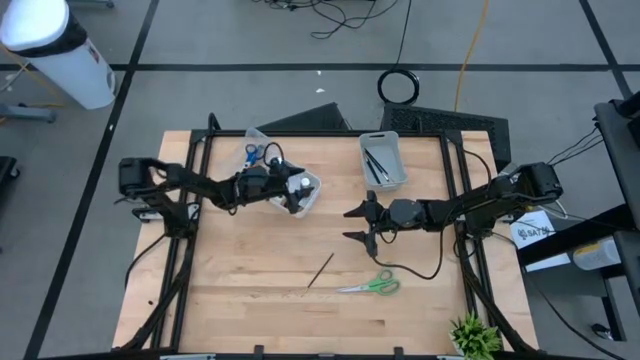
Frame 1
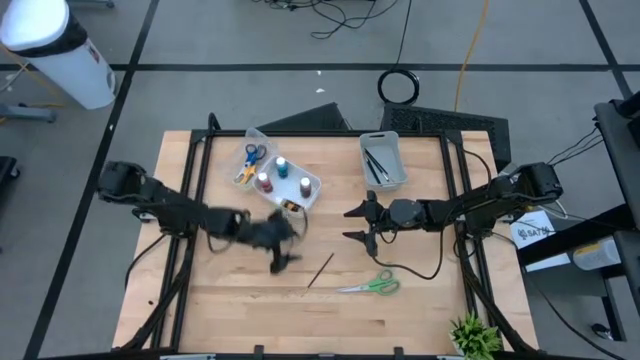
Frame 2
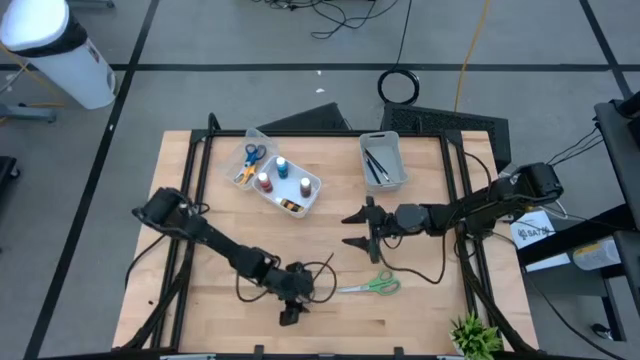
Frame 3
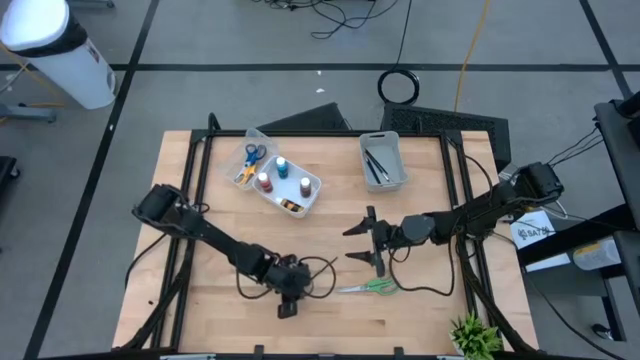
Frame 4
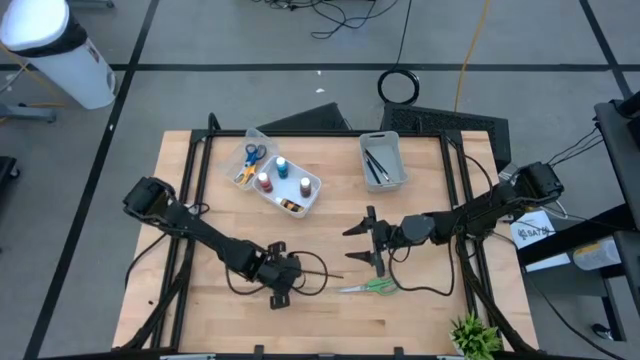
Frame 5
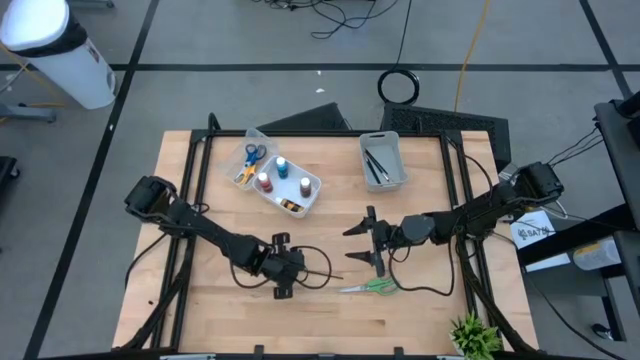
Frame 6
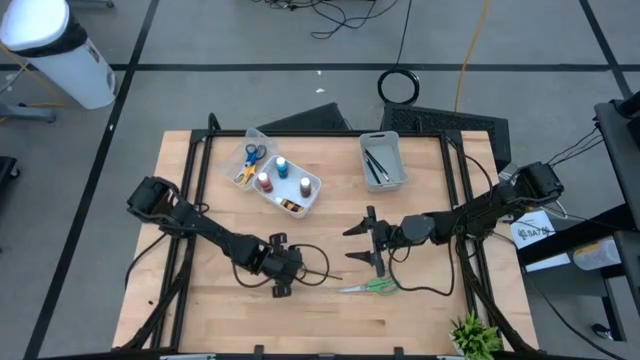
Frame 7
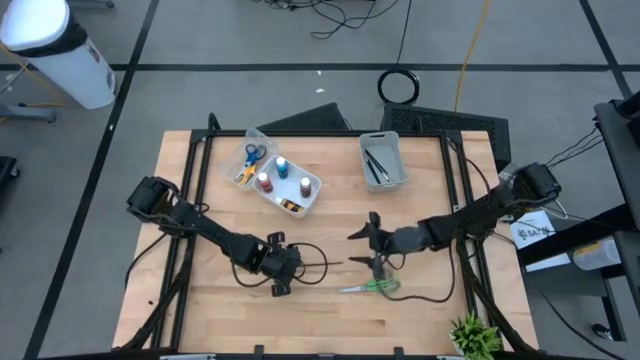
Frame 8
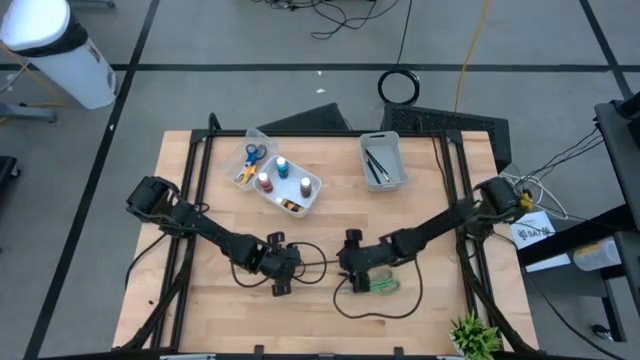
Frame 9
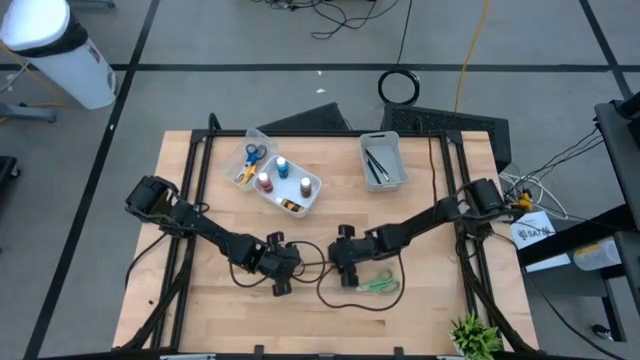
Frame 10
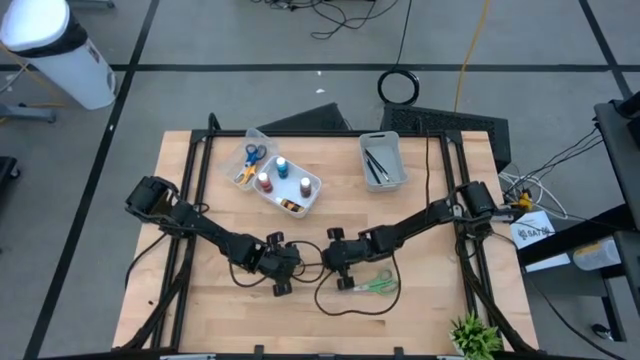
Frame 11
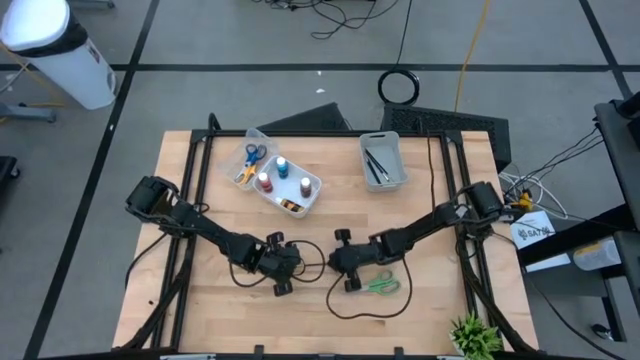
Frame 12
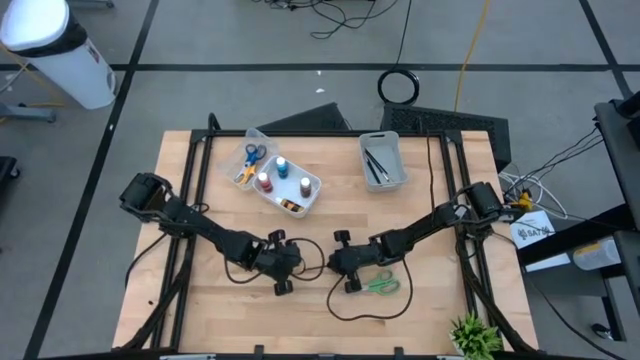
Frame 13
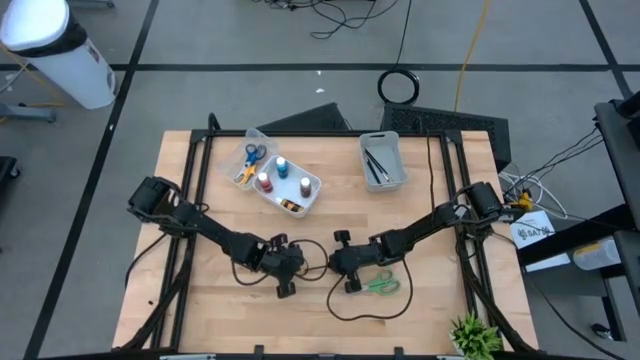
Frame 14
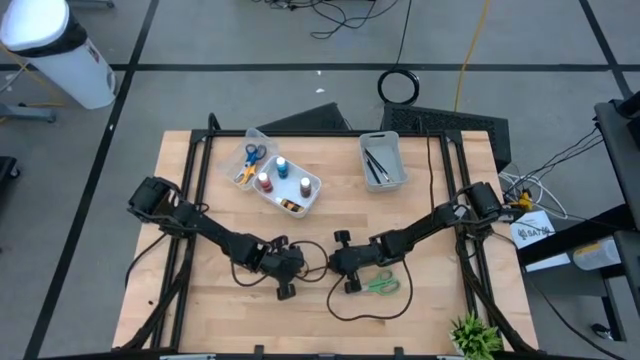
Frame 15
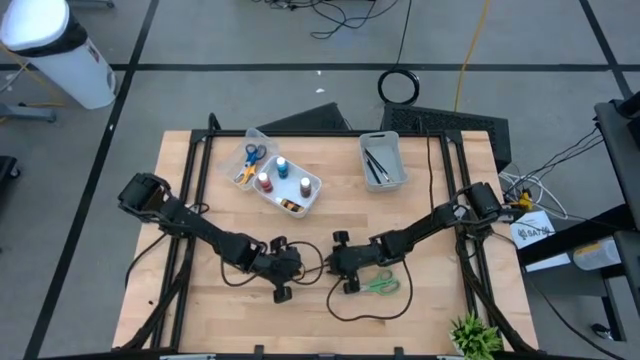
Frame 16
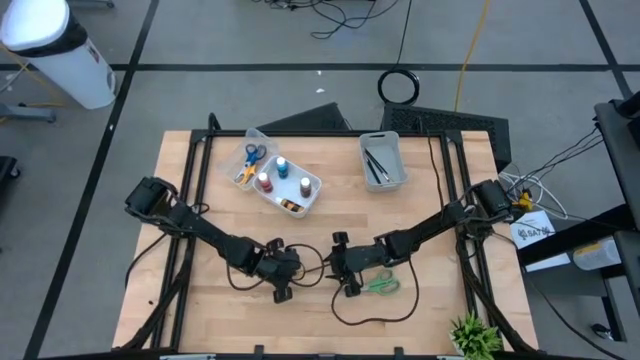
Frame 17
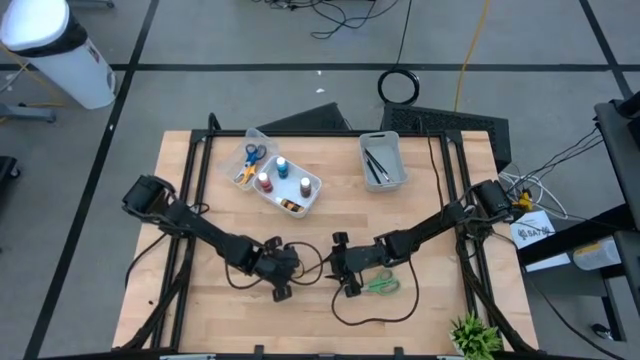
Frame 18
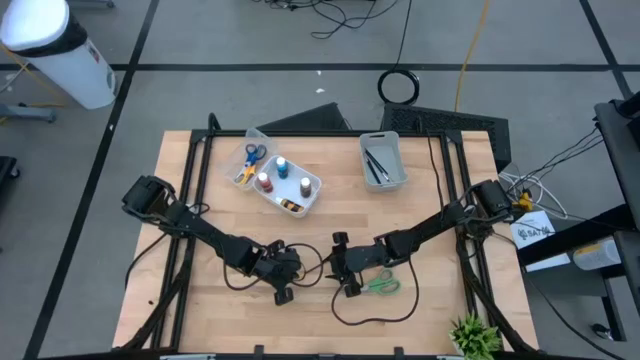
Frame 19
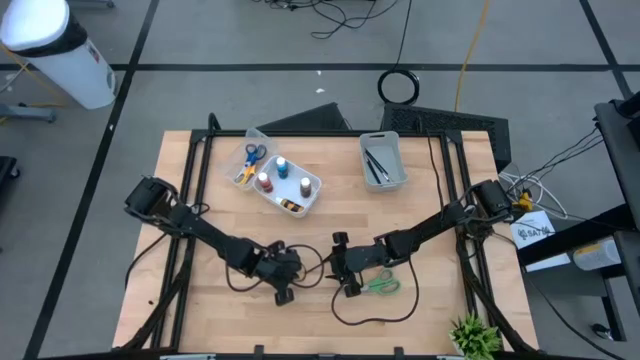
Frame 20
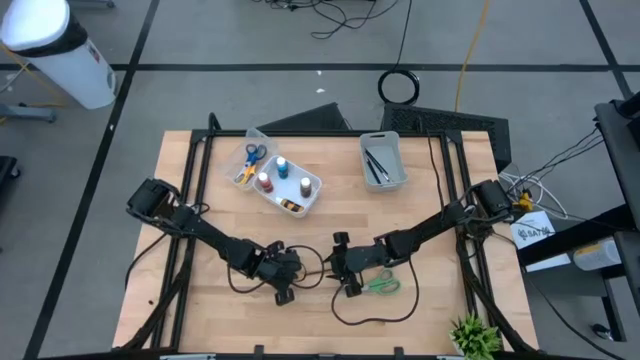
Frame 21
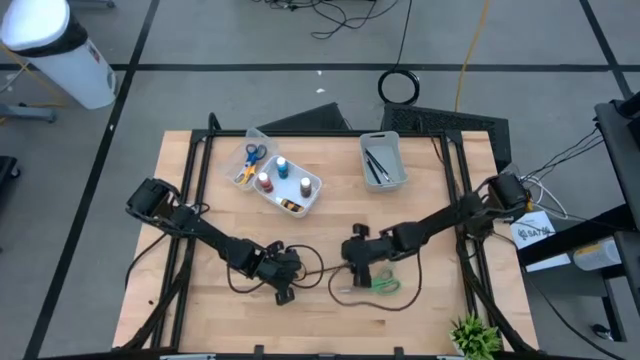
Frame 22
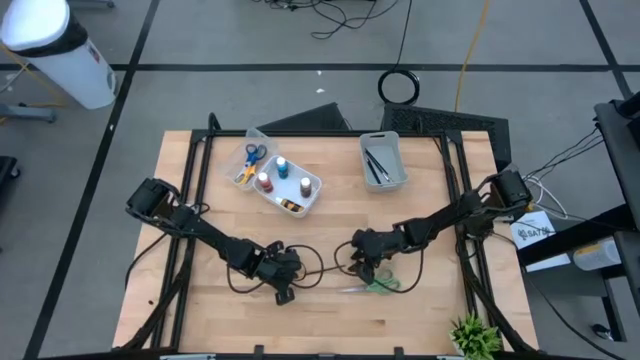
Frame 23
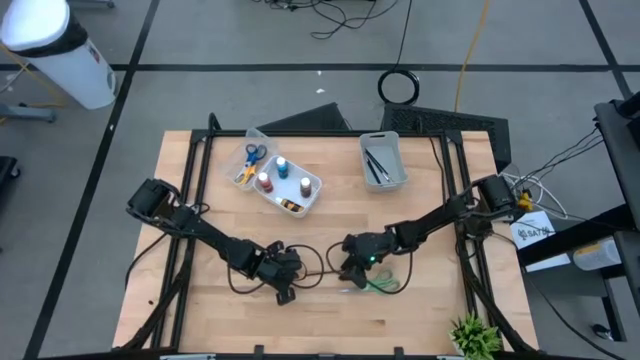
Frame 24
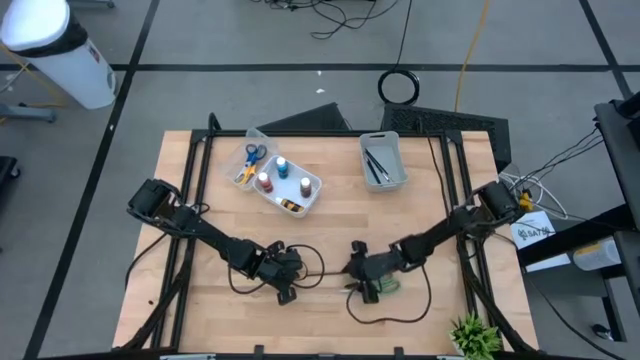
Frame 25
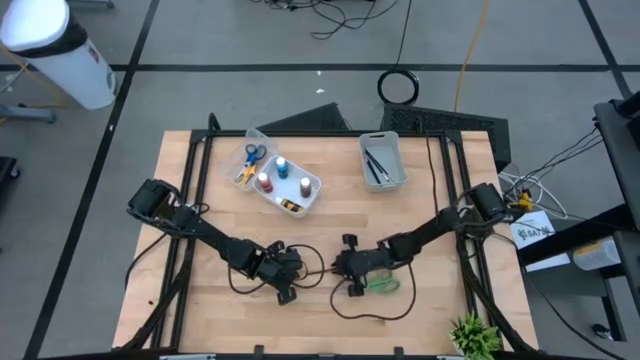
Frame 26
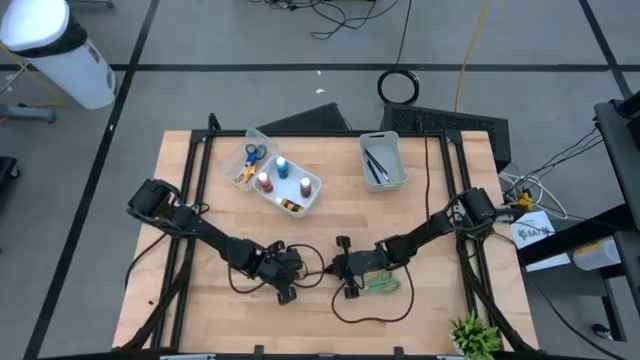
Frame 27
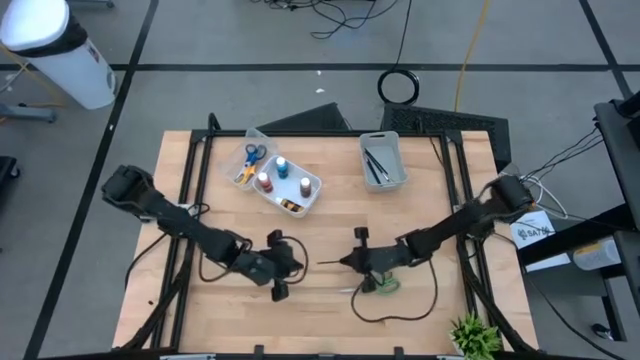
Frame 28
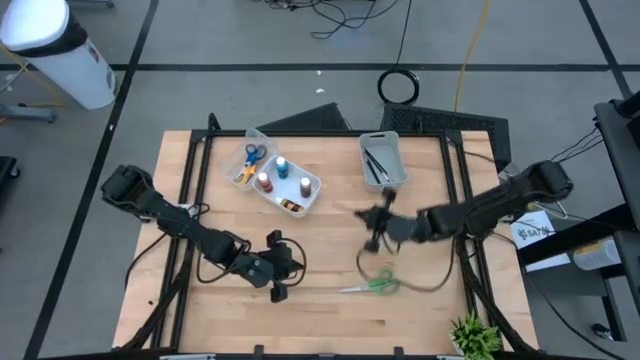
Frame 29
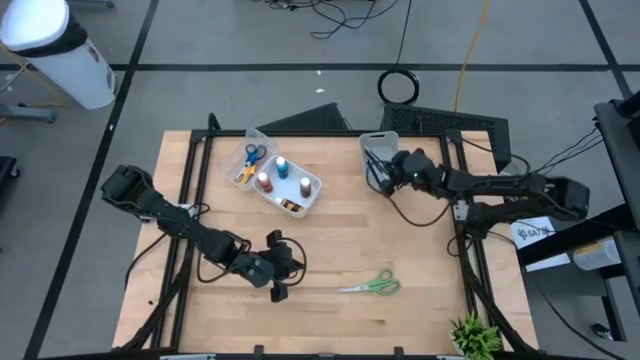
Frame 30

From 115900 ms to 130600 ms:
Task: Pick & Place Paint Supplies
Put the gold and black paintbrush into the gray bin

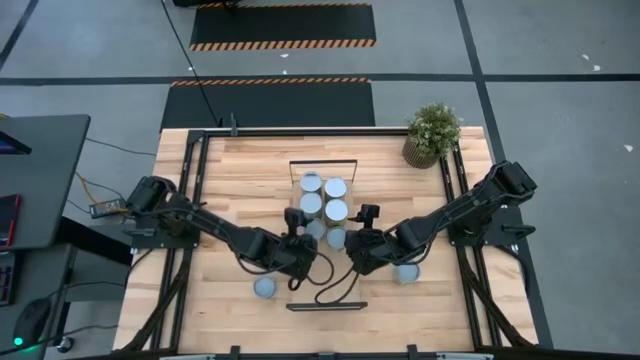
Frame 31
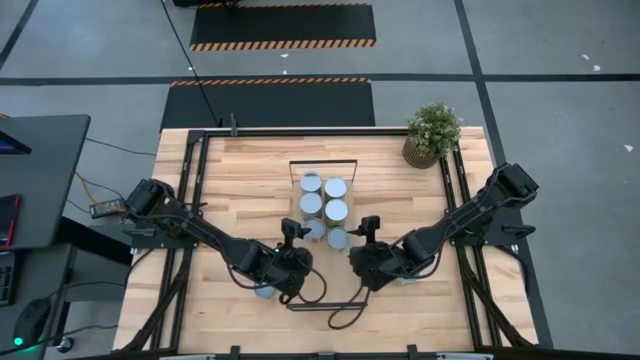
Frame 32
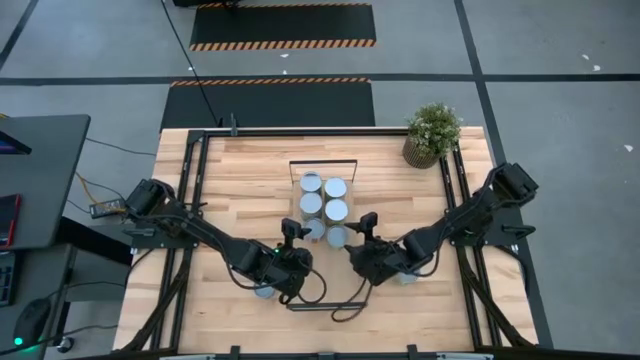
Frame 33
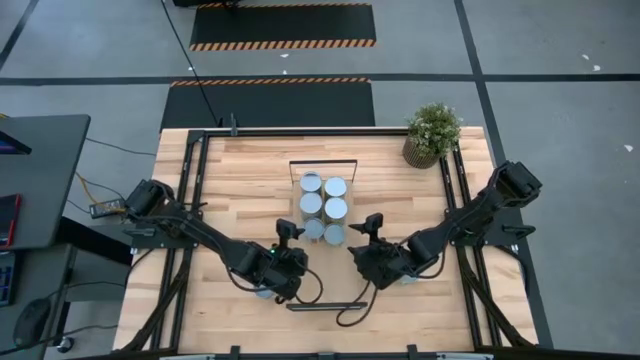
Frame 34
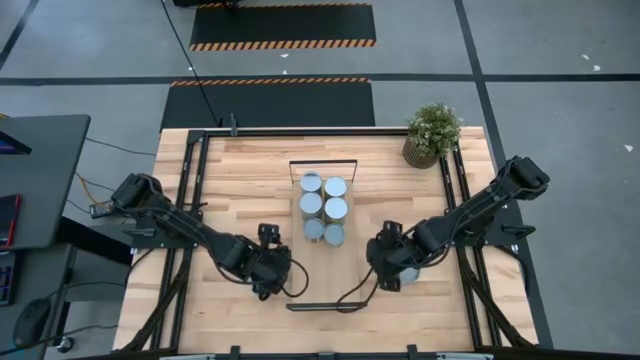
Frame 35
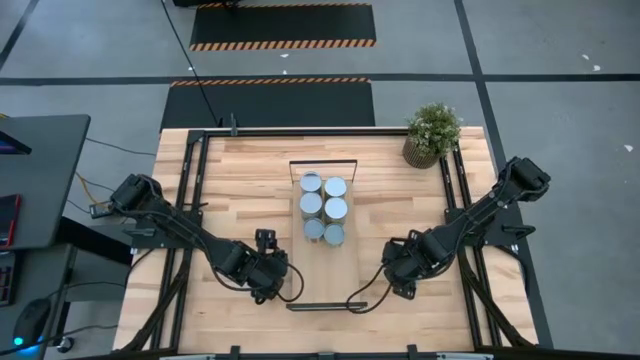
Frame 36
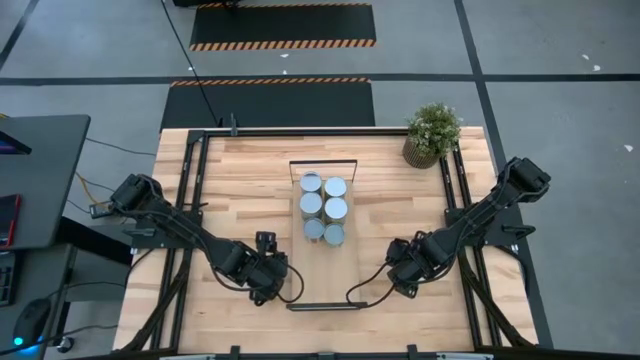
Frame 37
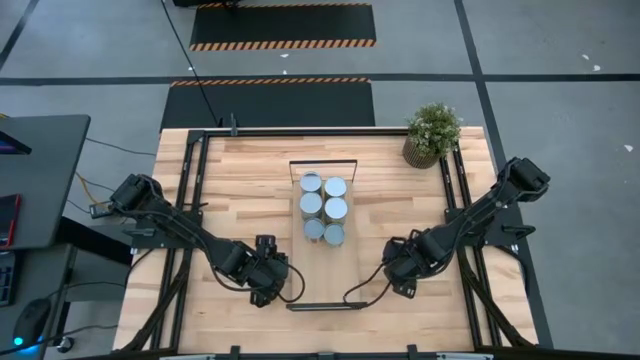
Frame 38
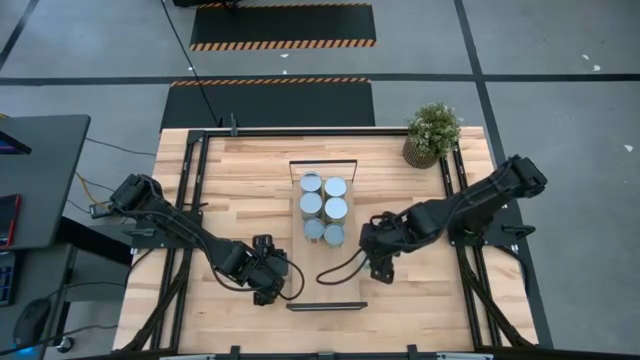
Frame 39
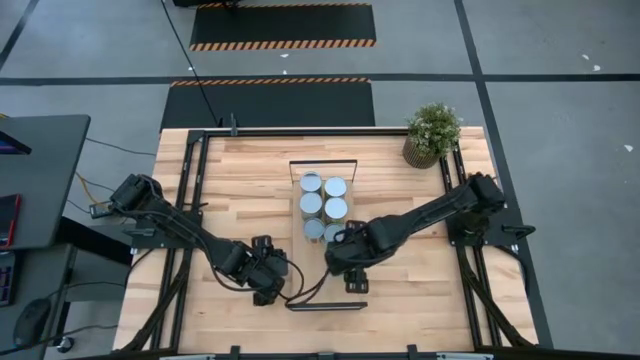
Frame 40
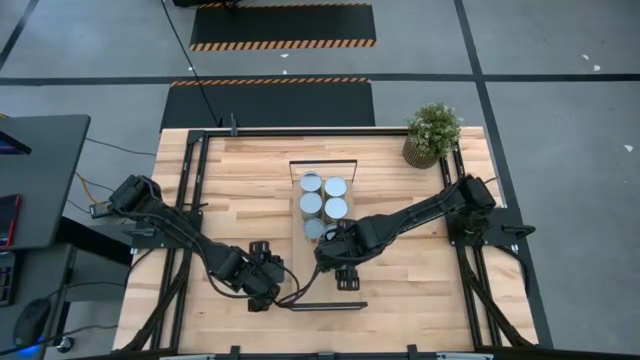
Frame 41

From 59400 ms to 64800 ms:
Task: Pick and place cans onto a shelf
Put the canned mixed vegetables on the shelf

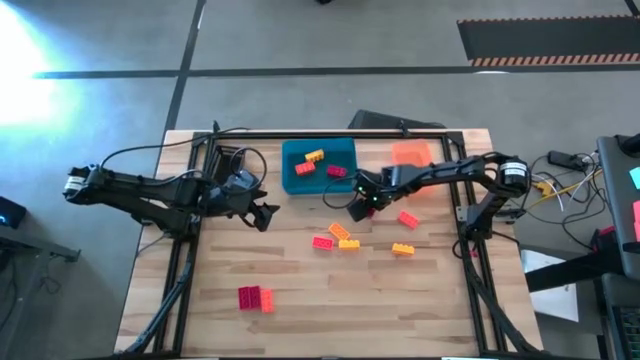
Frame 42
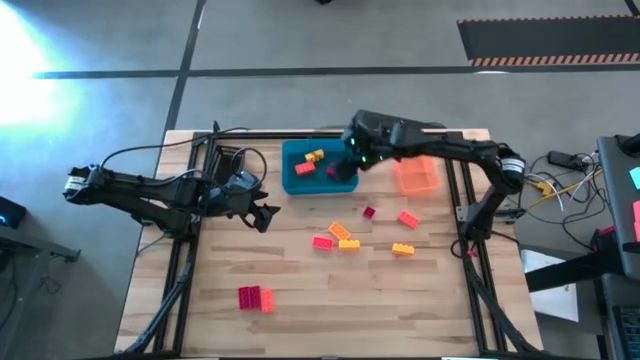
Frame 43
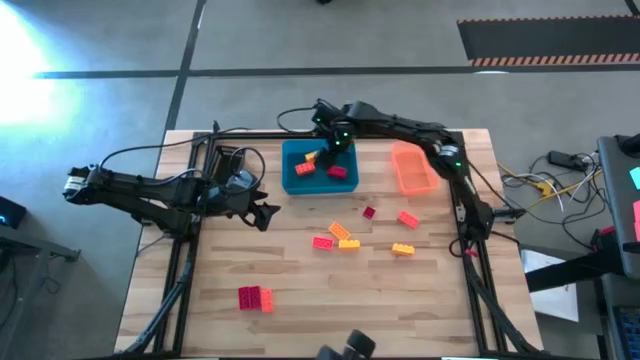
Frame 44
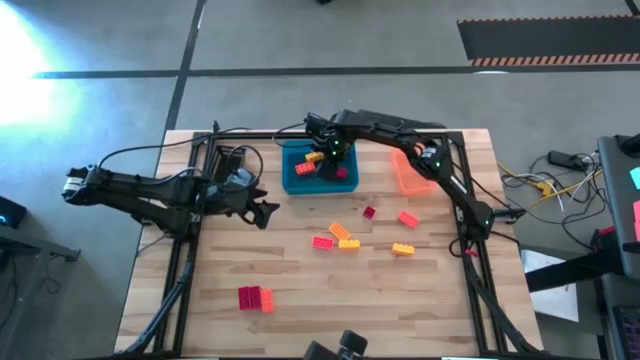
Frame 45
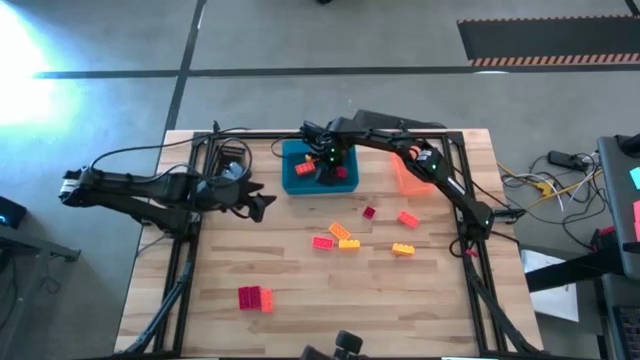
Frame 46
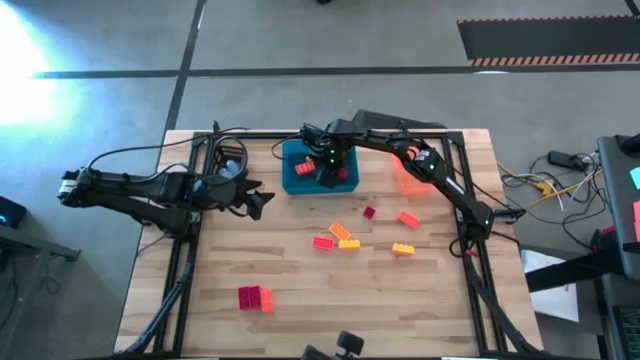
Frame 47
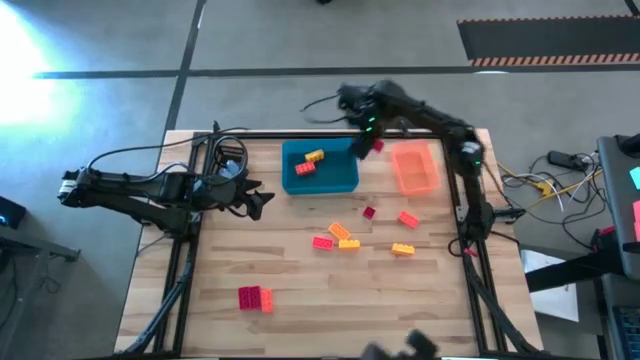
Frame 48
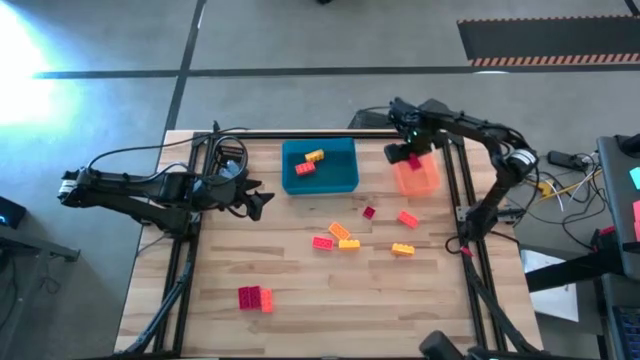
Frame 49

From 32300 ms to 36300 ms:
Task: Sort & place blocks by color
Put the red game piece into the orange bin
